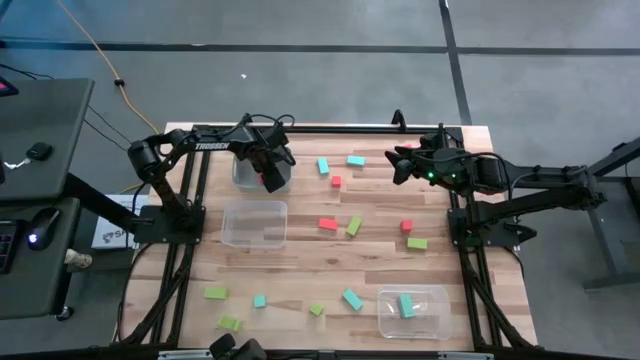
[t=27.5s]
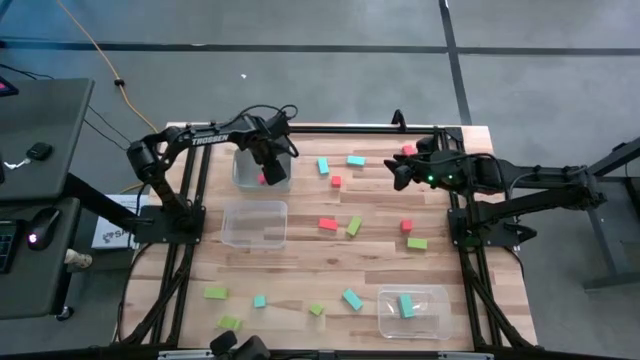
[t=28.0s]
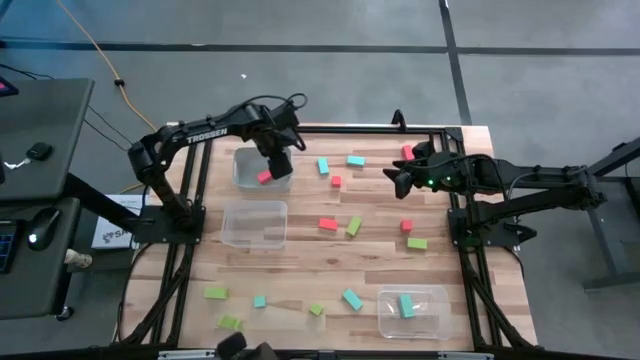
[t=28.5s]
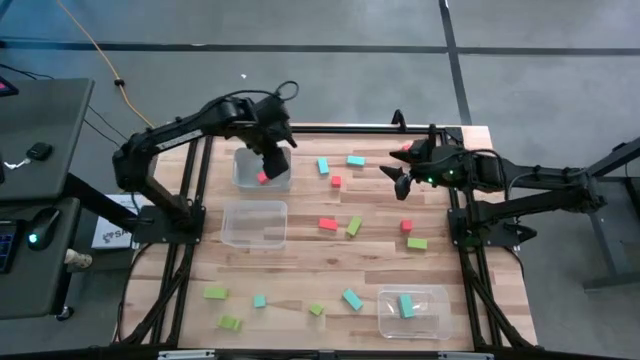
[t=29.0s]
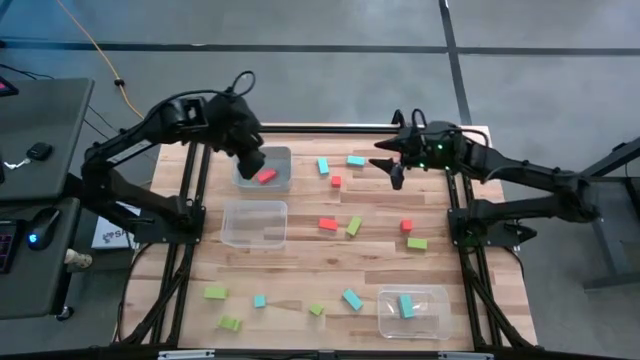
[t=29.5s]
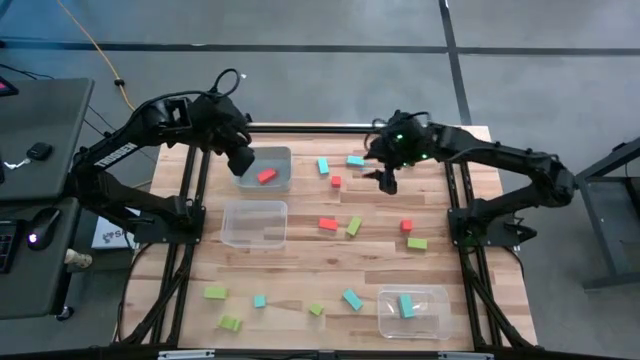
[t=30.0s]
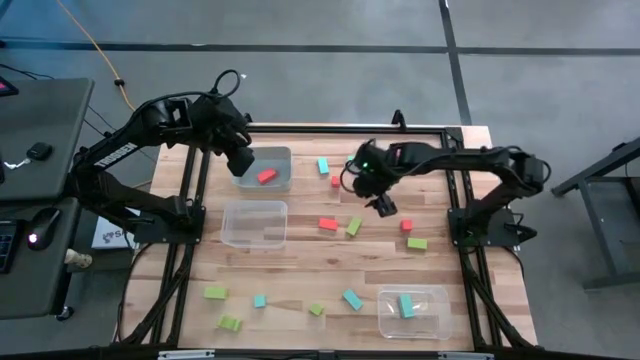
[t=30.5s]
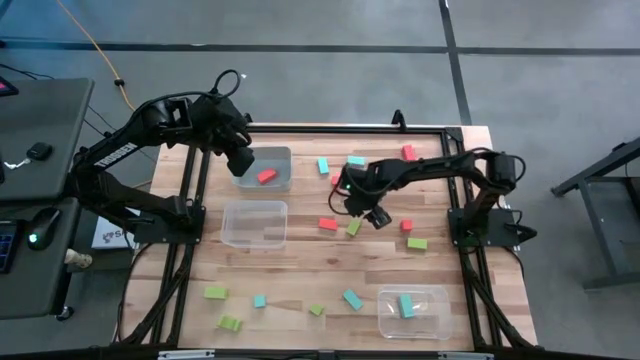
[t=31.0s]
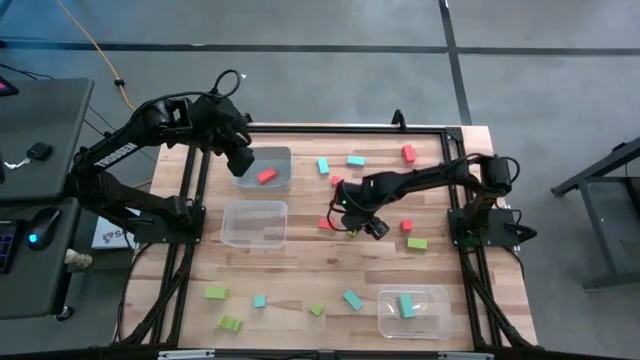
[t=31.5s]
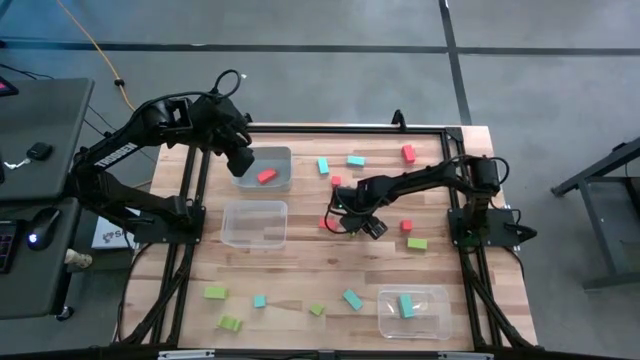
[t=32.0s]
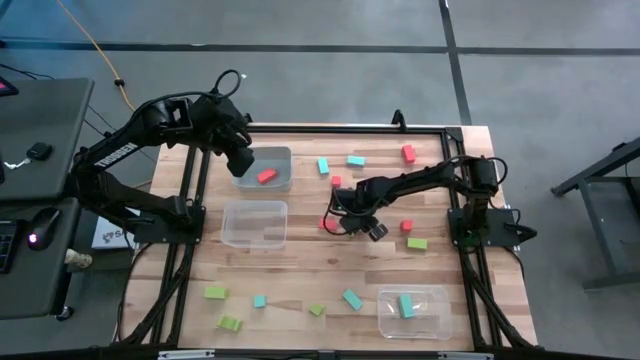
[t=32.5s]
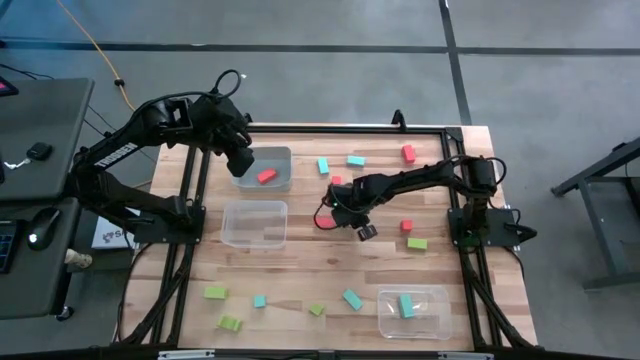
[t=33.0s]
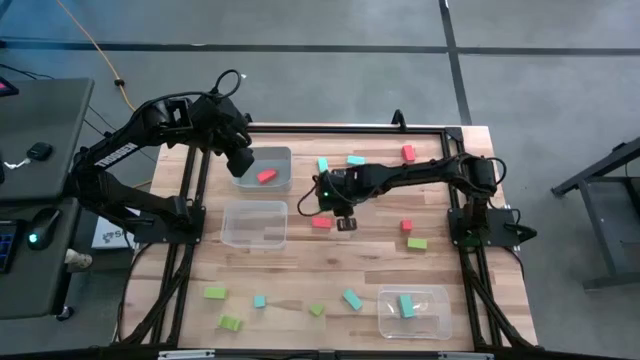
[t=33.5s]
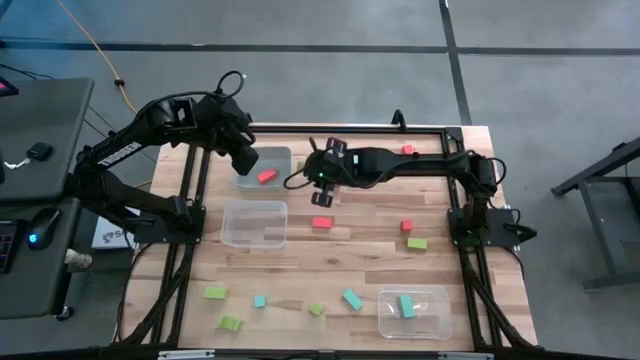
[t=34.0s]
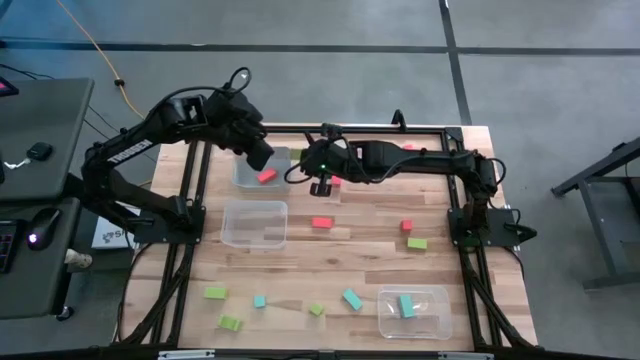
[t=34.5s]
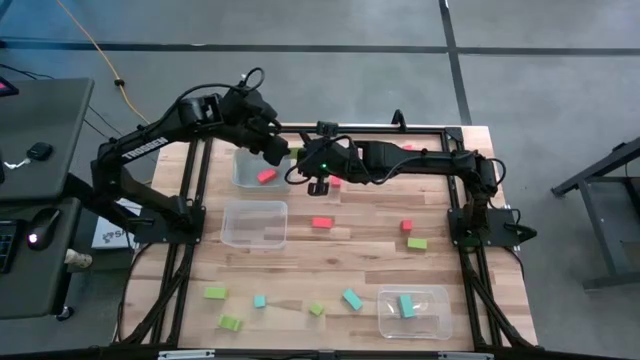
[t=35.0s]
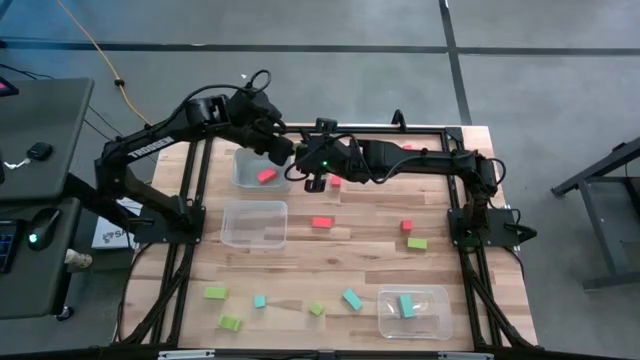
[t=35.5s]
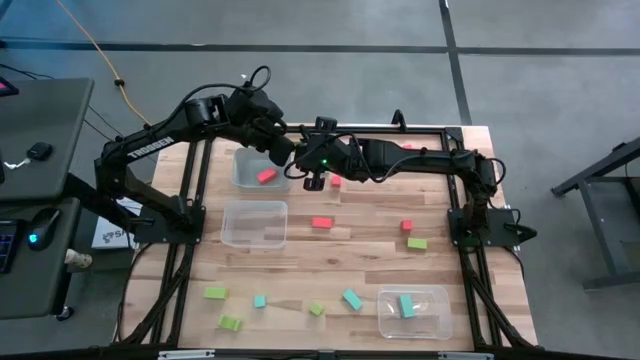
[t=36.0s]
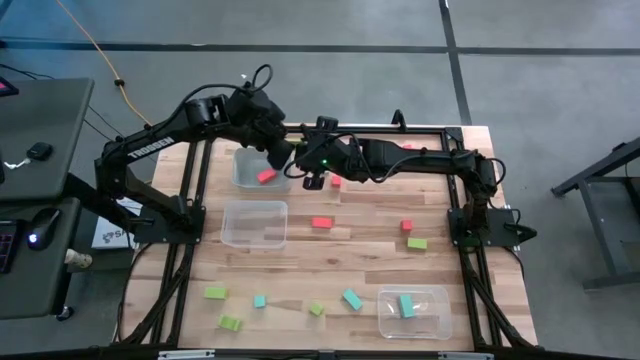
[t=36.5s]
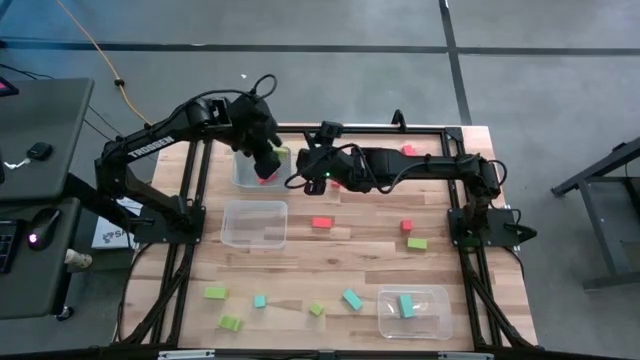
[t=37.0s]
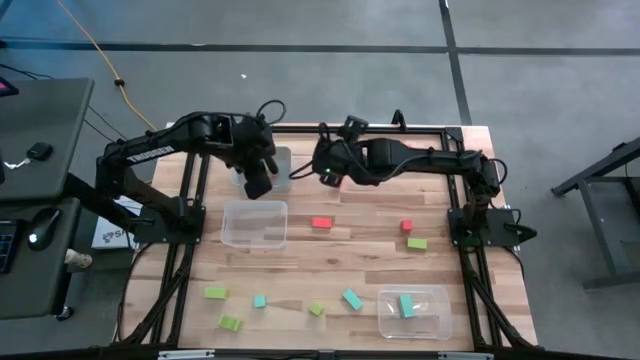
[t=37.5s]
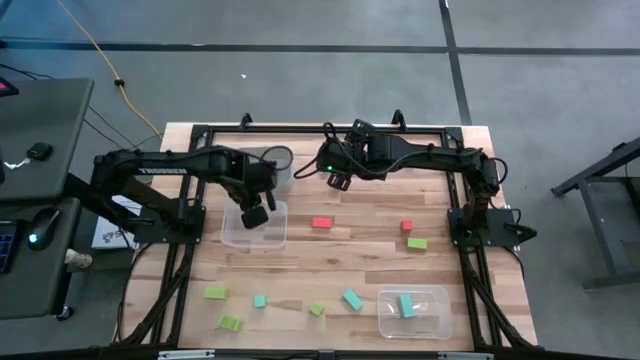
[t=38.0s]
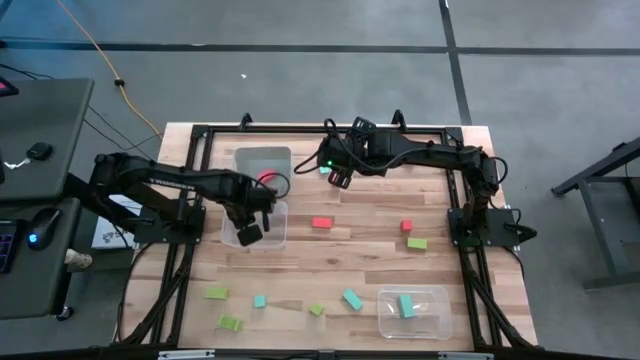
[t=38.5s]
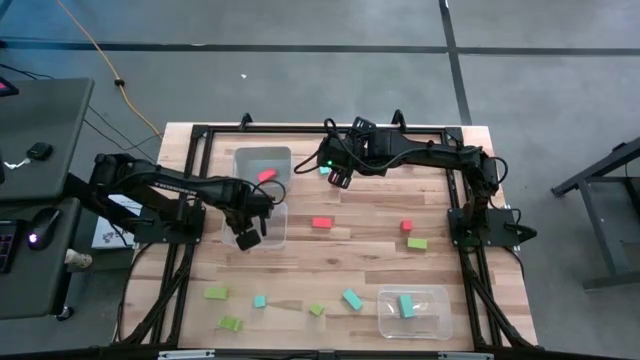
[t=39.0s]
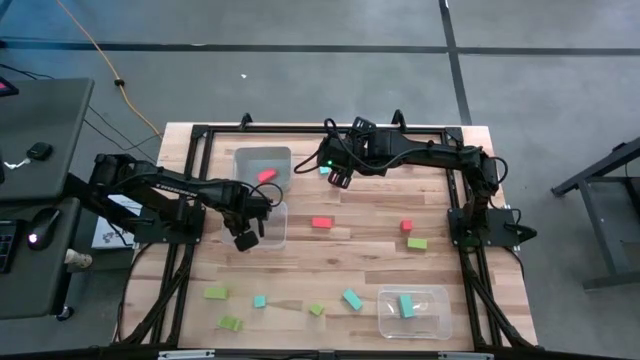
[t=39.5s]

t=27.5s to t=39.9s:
Task: Sort & place blocks by color
Put the green block into the top transparent bin

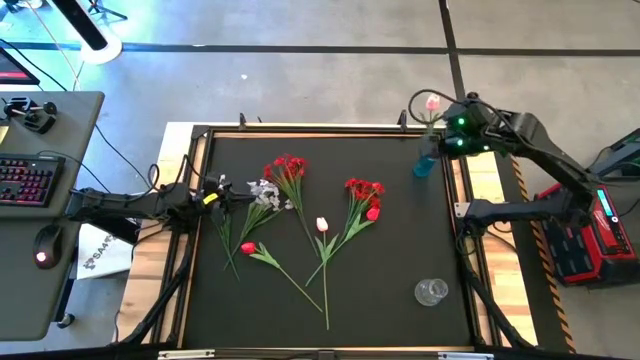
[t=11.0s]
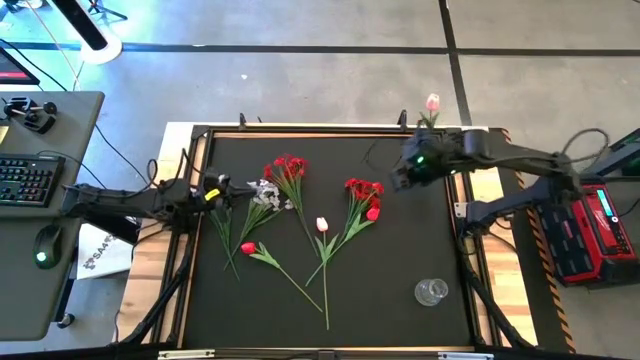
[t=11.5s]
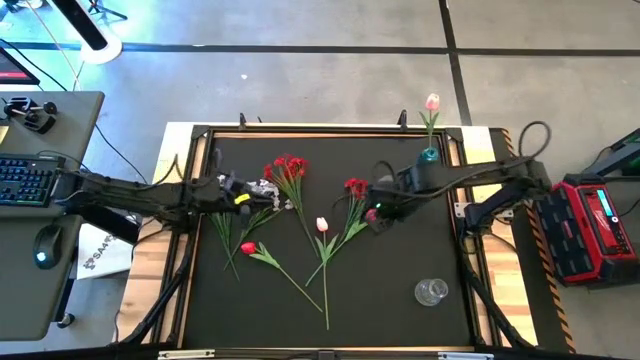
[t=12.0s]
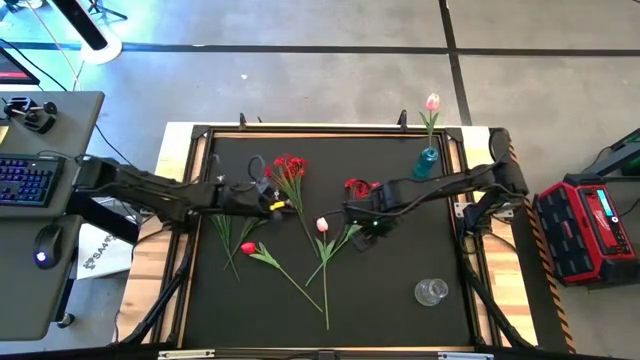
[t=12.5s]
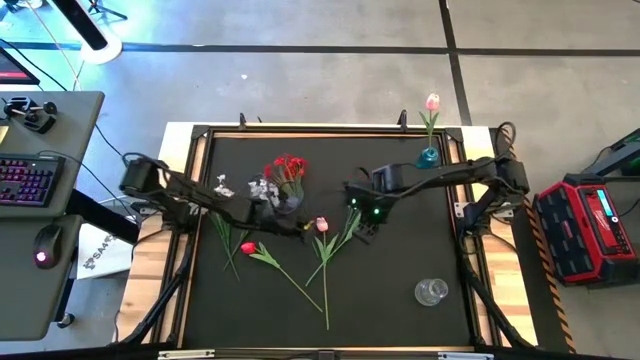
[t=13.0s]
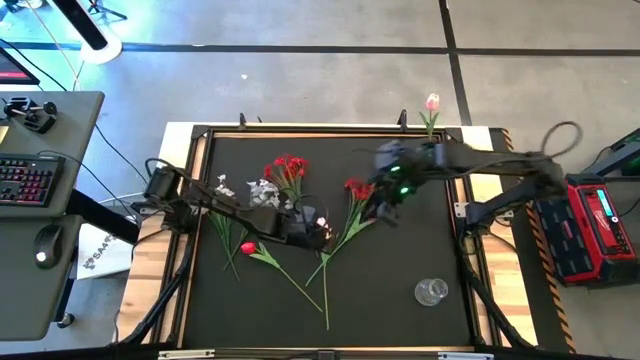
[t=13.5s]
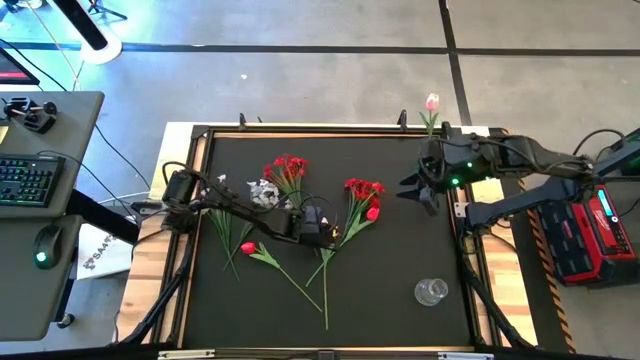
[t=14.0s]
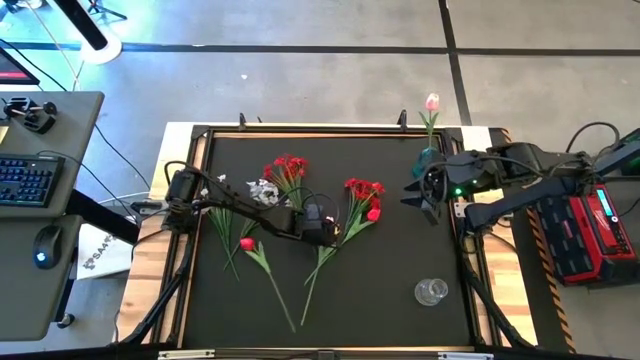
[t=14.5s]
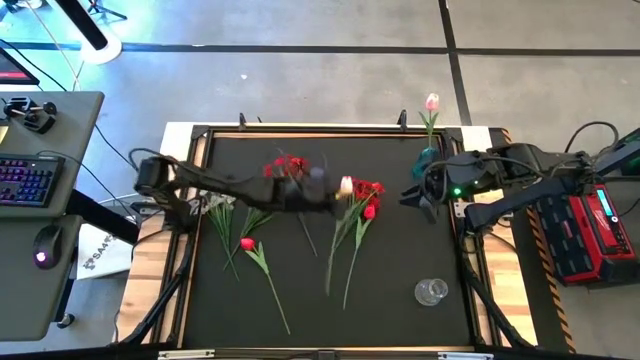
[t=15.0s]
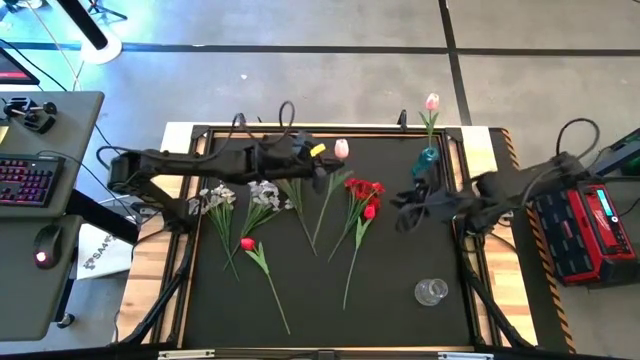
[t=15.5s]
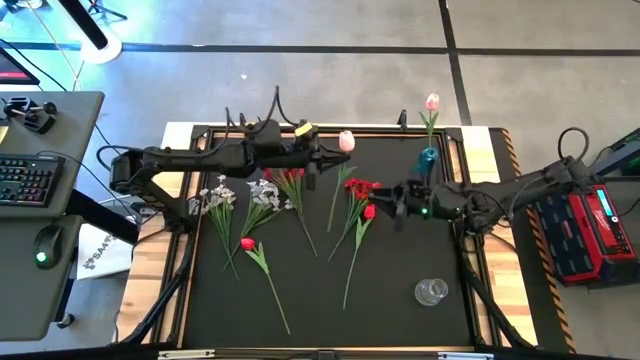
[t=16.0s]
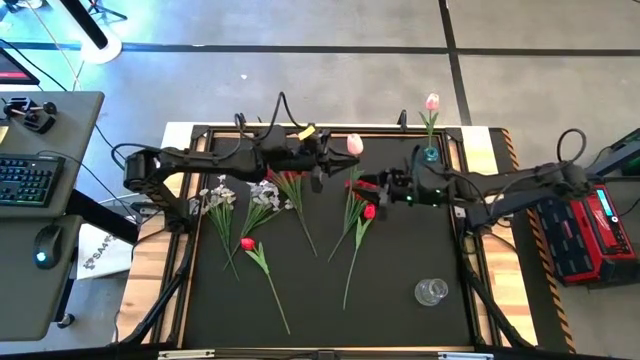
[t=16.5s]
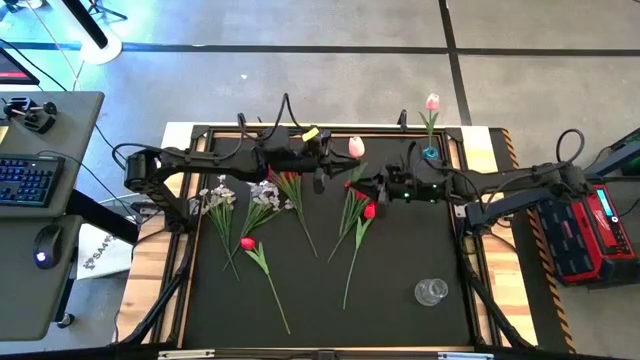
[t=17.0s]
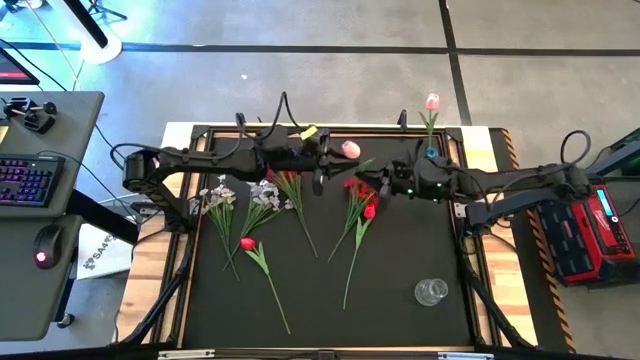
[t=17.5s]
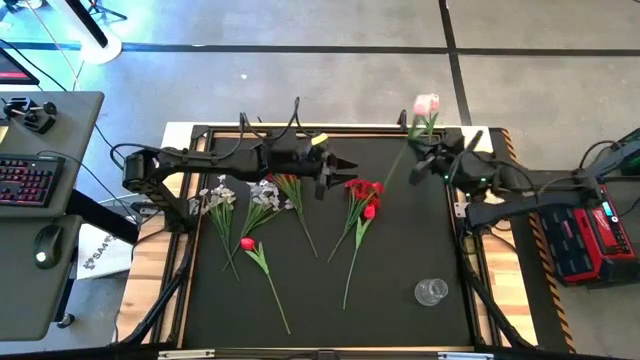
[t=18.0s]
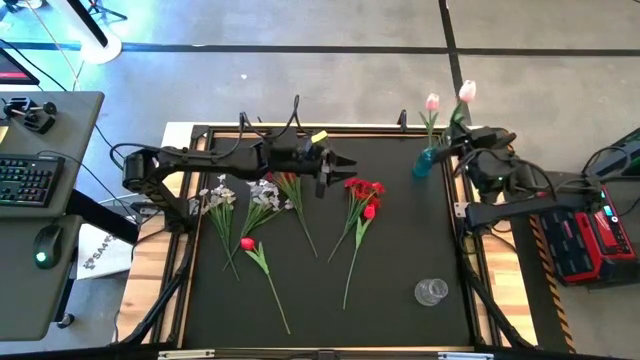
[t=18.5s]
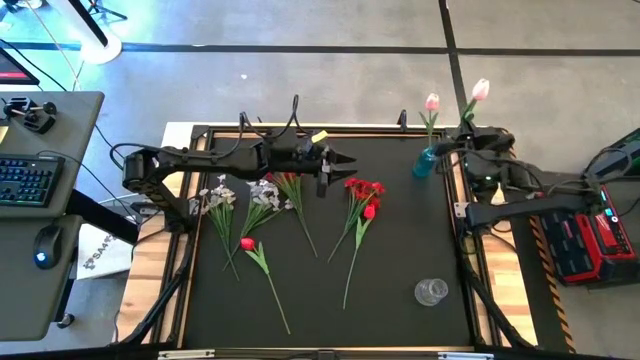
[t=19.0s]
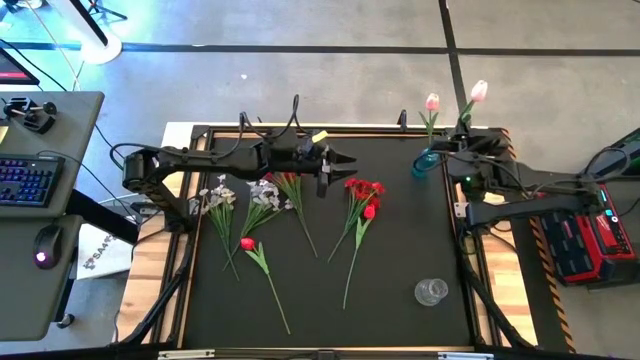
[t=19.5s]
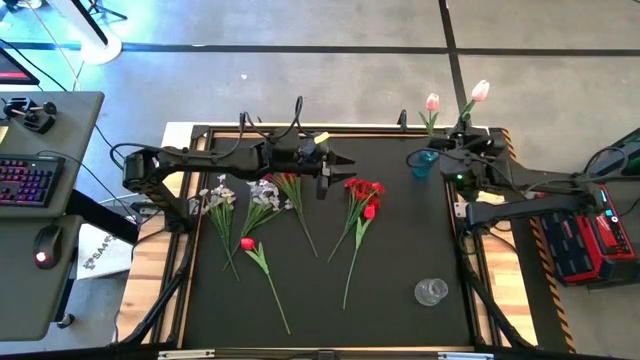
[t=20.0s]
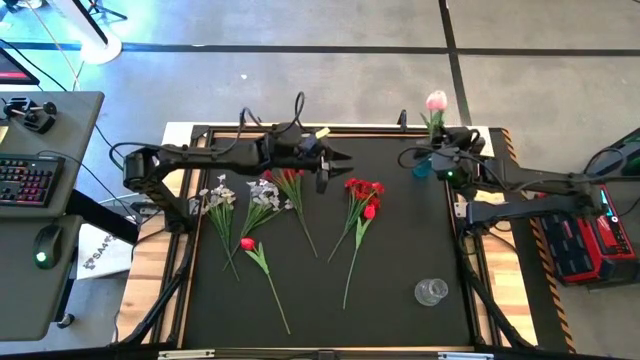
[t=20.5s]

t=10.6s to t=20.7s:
Task: Sort flowers into vase by color
Put the pink flower into the blue vase
